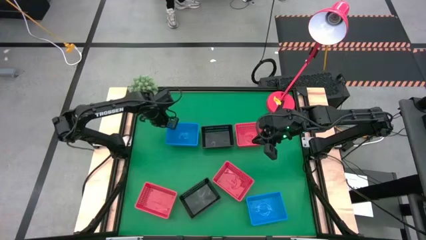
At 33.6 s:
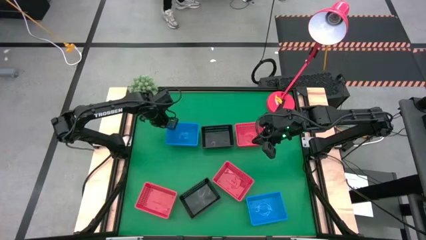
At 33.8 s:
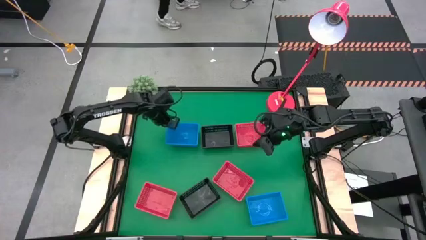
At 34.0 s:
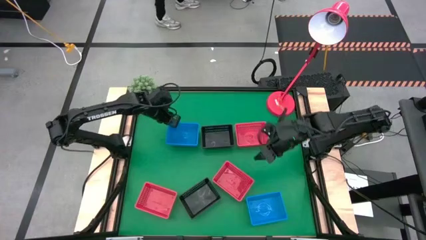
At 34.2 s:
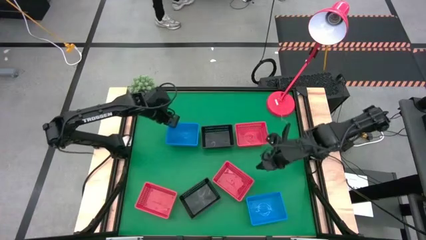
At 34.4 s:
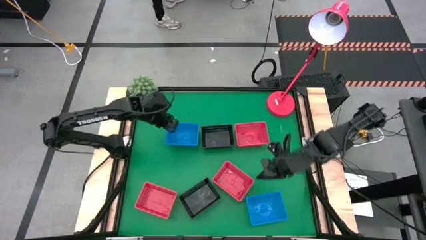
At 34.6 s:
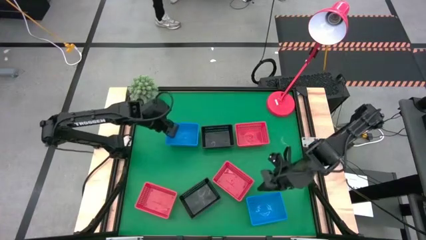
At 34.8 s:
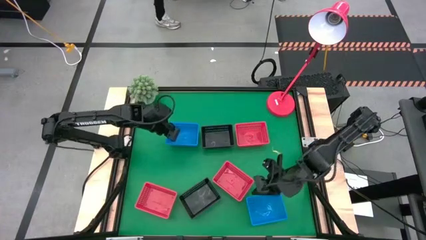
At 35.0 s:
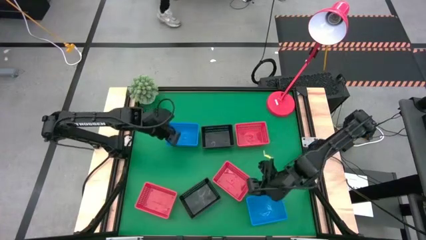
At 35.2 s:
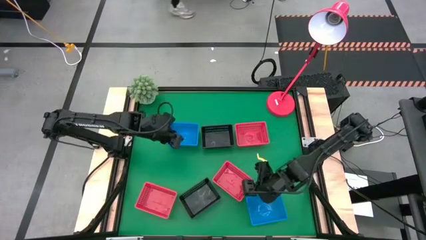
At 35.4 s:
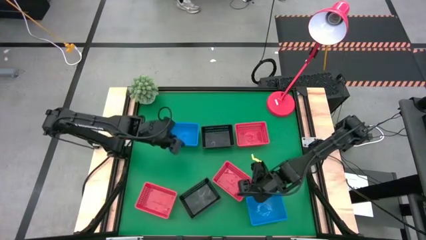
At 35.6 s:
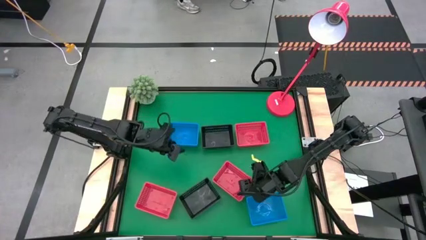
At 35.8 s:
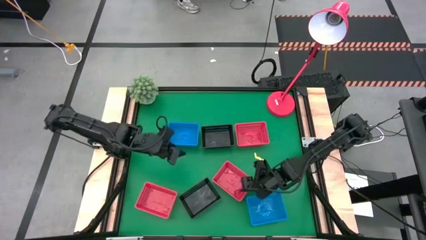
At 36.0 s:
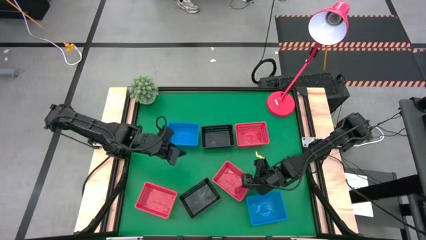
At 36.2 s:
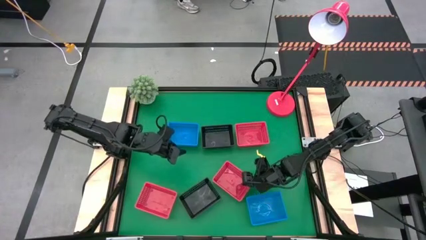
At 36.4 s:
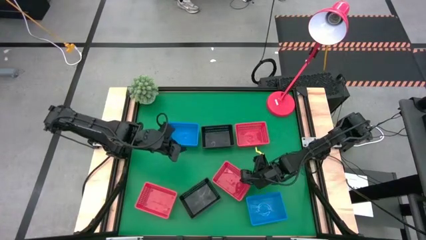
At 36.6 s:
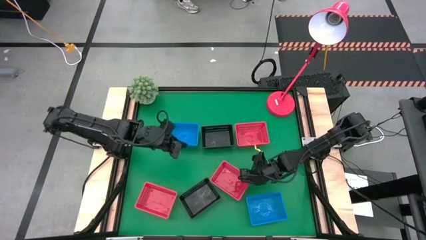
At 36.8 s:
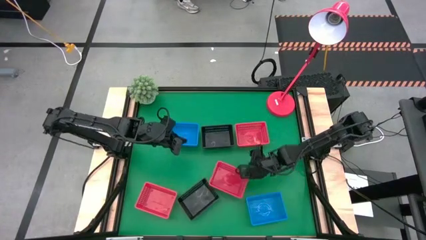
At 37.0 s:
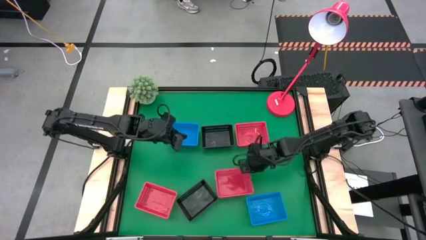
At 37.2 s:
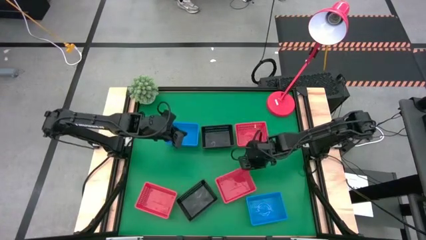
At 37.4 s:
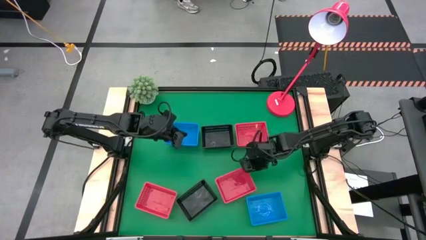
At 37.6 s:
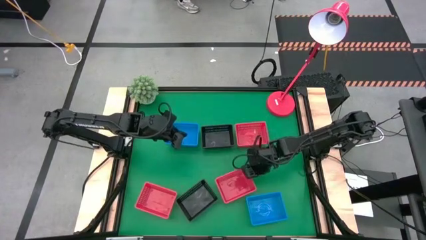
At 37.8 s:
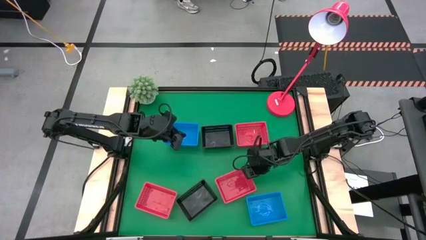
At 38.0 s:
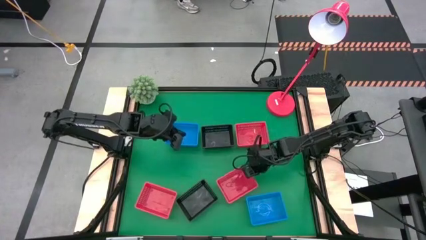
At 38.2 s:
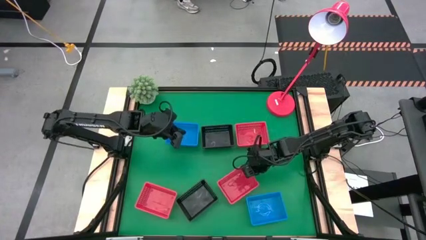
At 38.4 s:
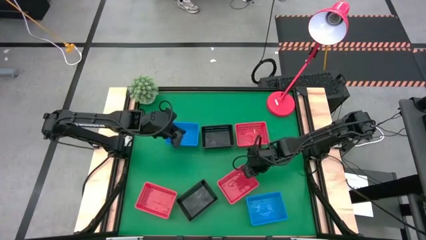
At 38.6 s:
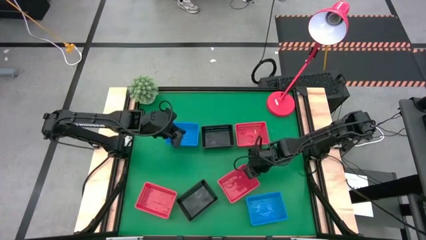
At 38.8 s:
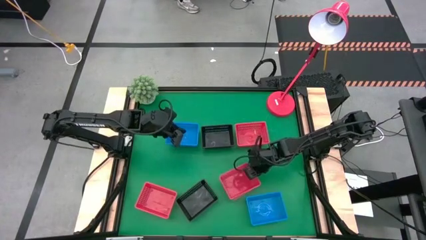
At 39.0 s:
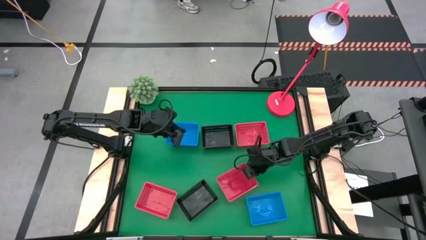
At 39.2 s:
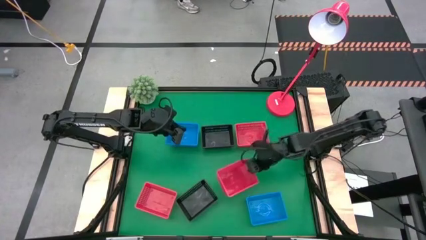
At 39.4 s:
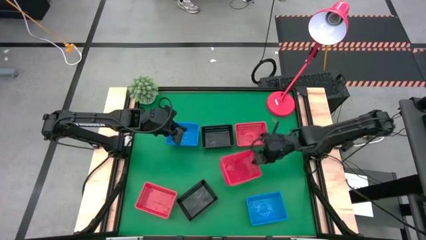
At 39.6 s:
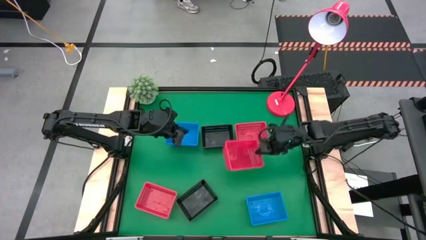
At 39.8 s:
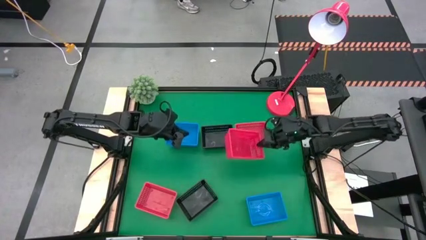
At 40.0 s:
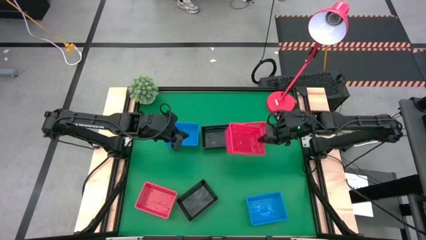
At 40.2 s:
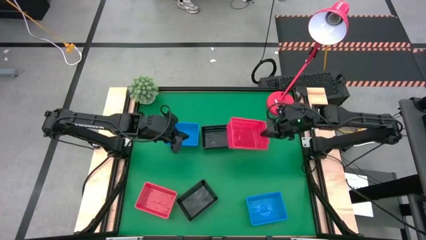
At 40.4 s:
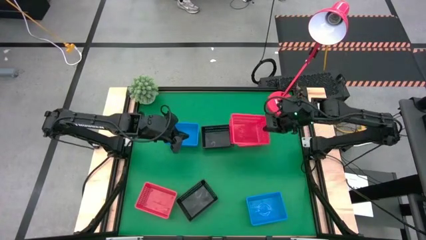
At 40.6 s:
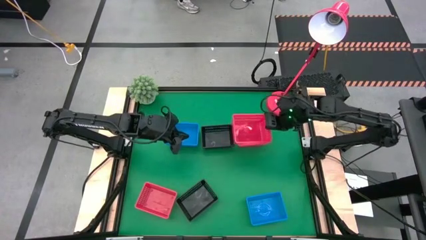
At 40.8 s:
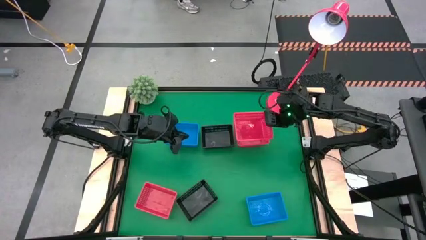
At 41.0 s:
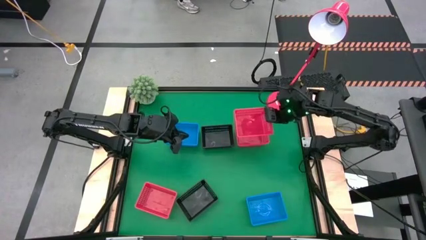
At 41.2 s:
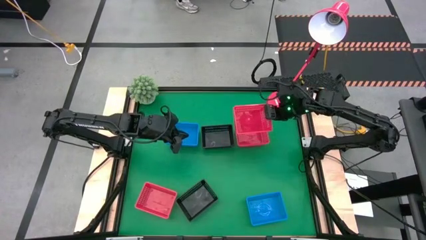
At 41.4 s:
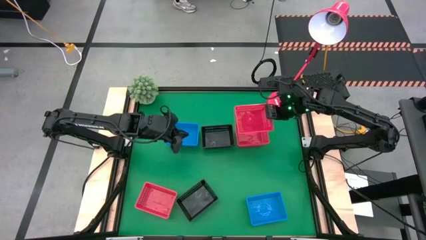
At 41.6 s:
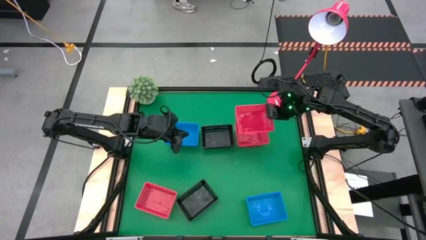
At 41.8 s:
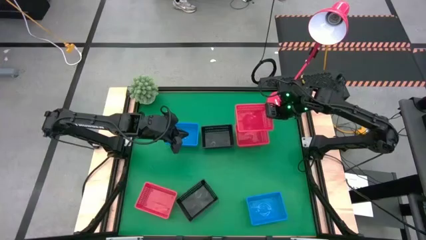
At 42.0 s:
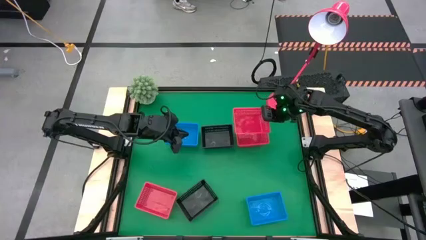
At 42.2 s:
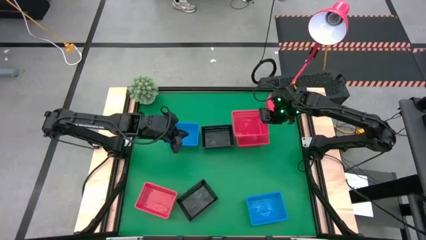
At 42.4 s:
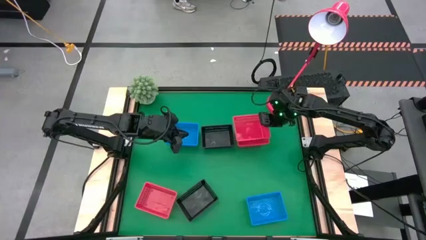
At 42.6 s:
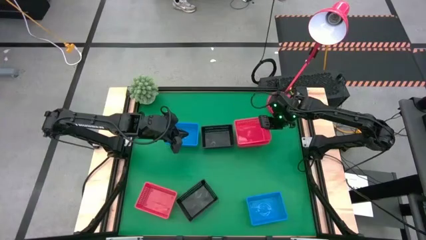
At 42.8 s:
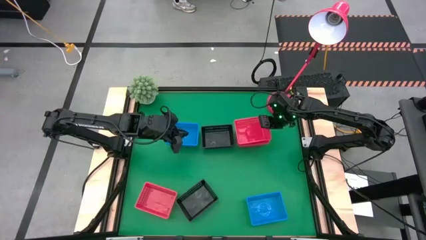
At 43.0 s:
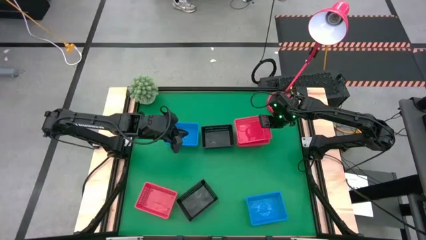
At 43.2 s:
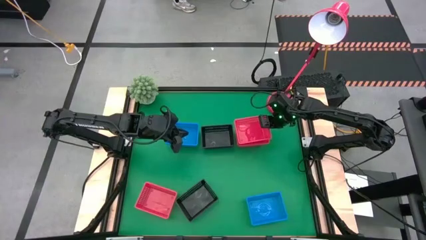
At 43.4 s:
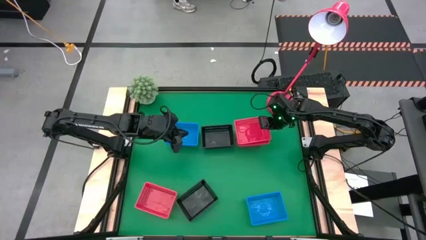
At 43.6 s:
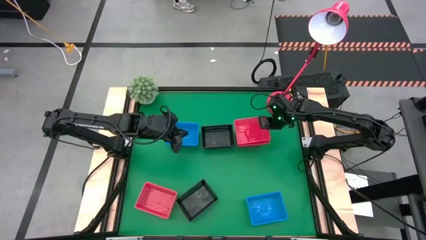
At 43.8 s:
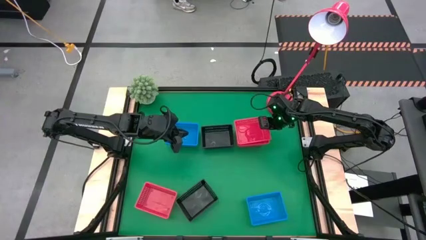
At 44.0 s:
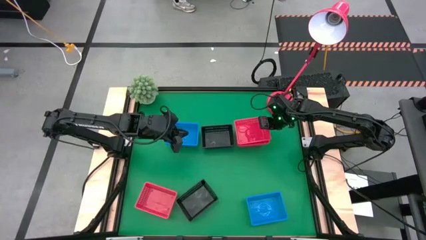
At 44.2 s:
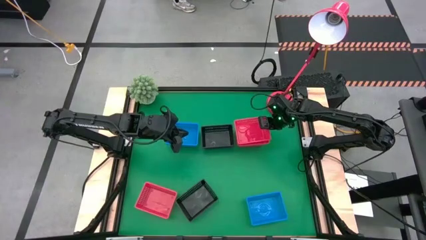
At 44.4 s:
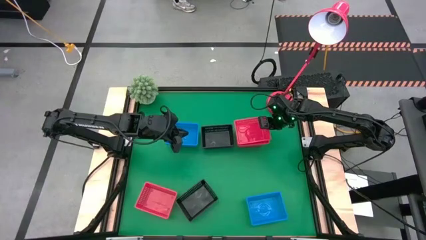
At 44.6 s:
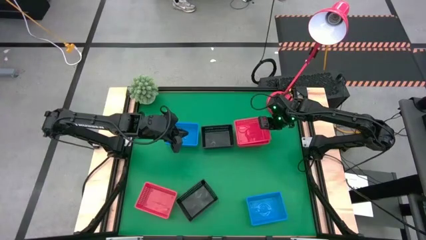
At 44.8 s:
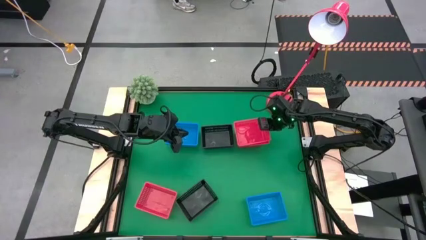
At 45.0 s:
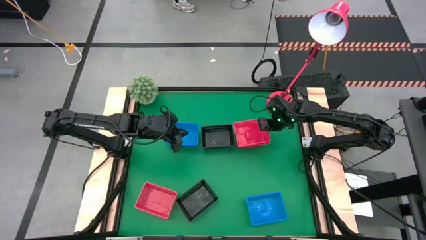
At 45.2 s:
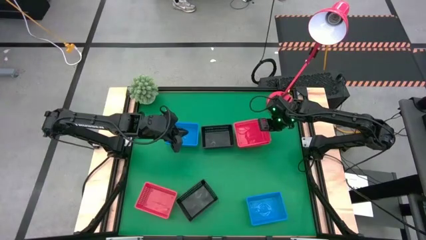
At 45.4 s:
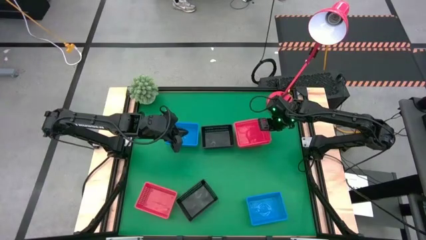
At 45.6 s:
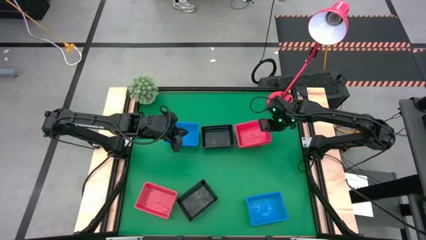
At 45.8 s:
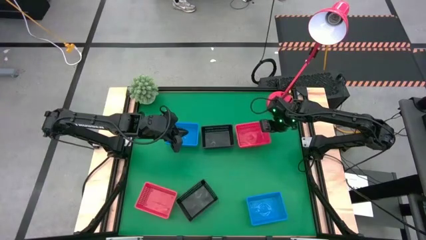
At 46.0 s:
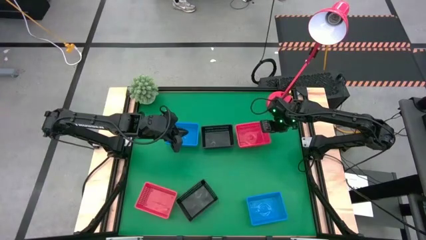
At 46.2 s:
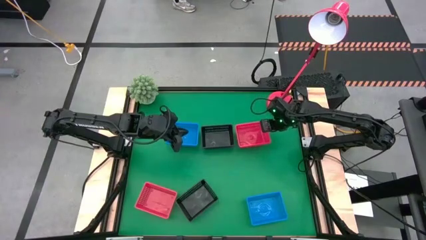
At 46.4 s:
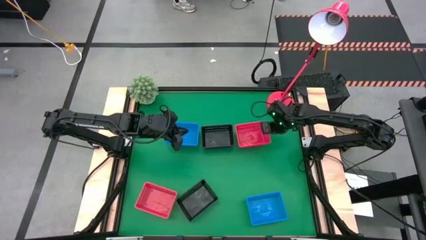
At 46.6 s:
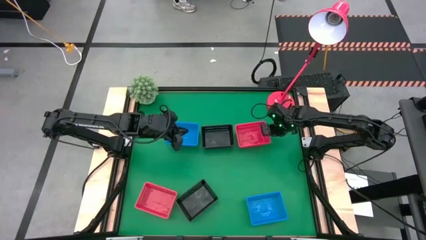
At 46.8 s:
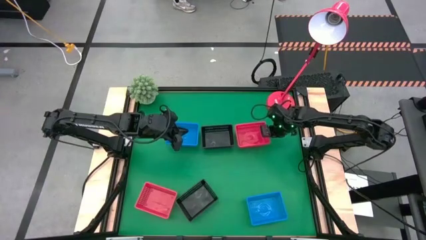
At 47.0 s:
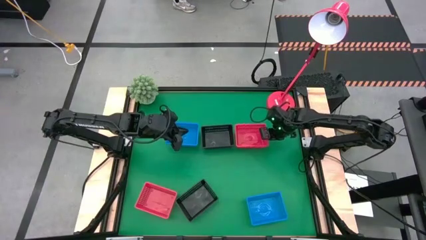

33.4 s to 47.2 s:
Stack the middle orange bin on the top orange bin
